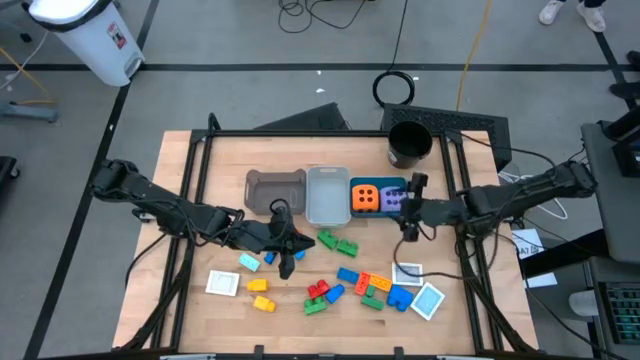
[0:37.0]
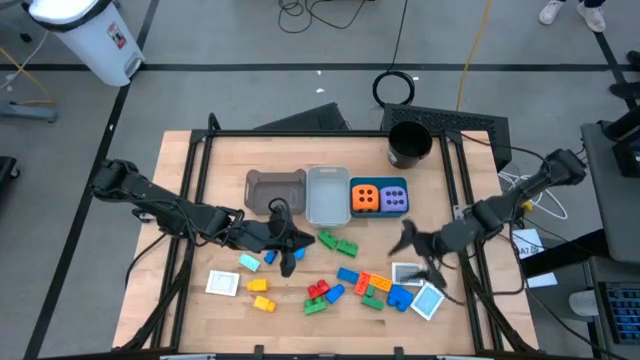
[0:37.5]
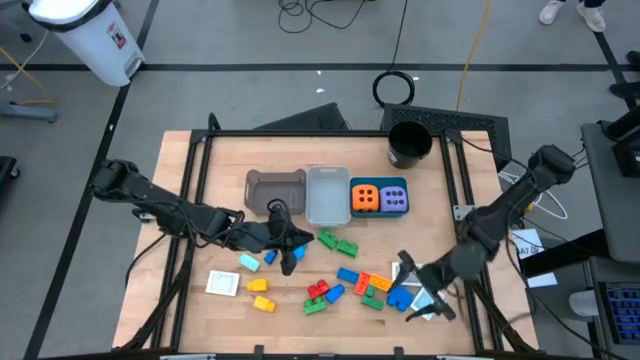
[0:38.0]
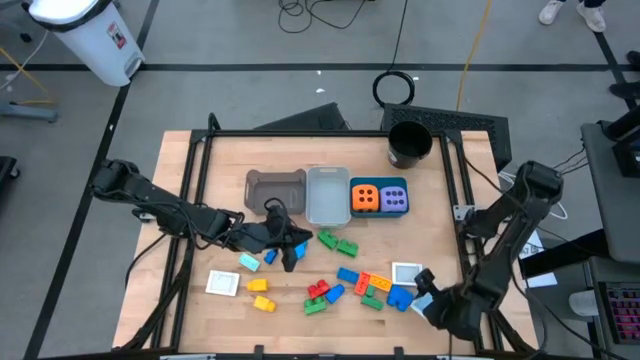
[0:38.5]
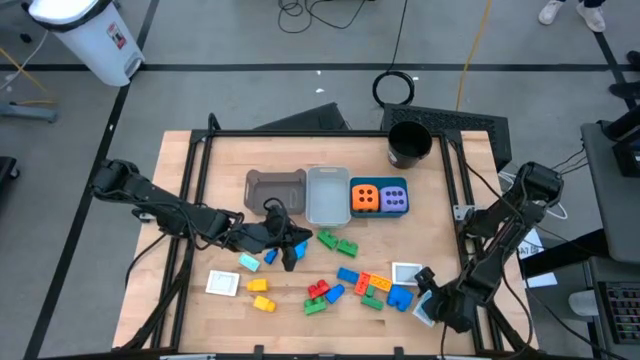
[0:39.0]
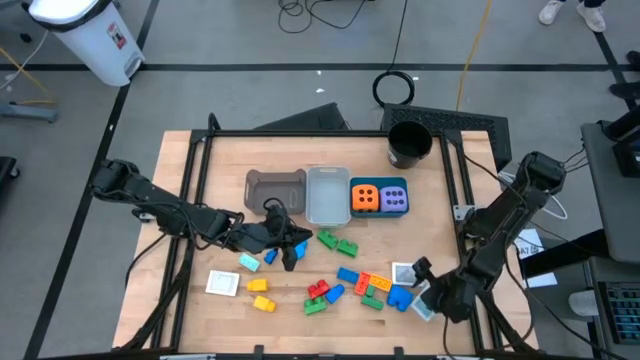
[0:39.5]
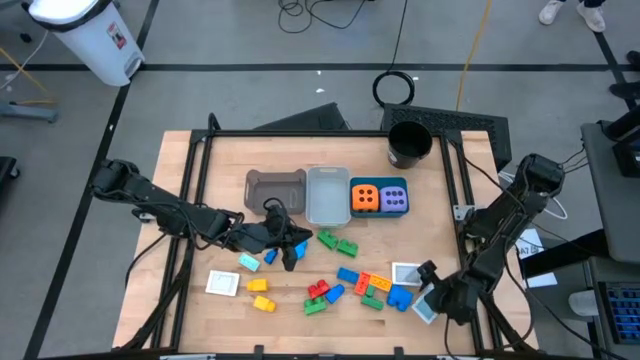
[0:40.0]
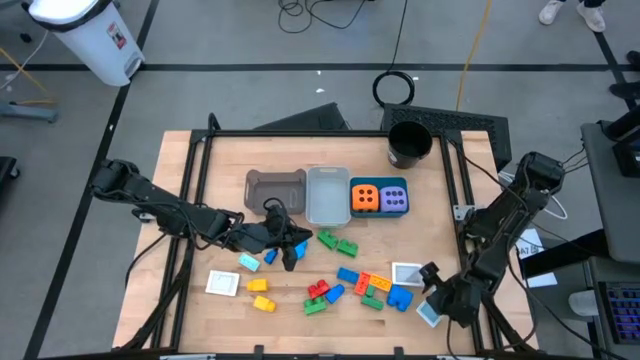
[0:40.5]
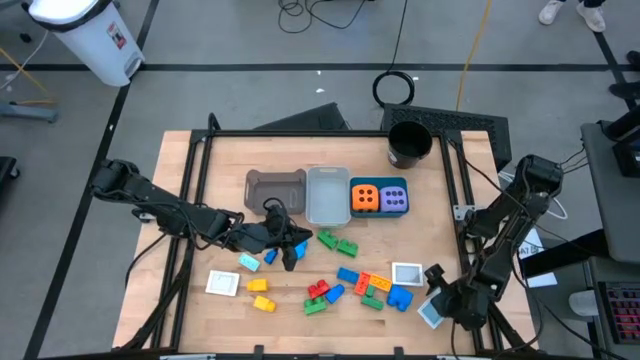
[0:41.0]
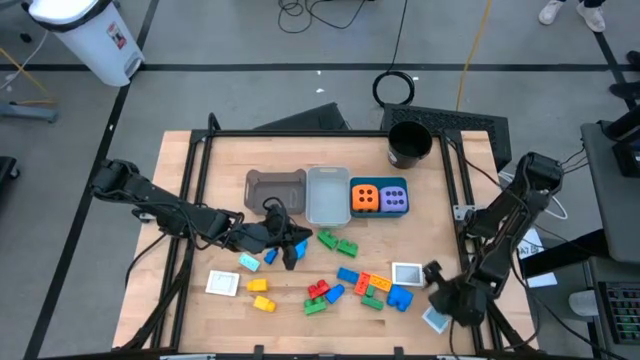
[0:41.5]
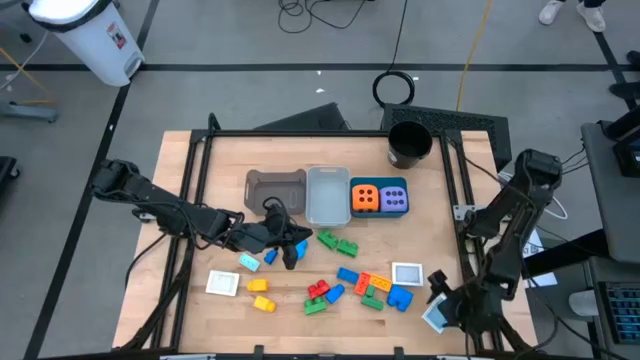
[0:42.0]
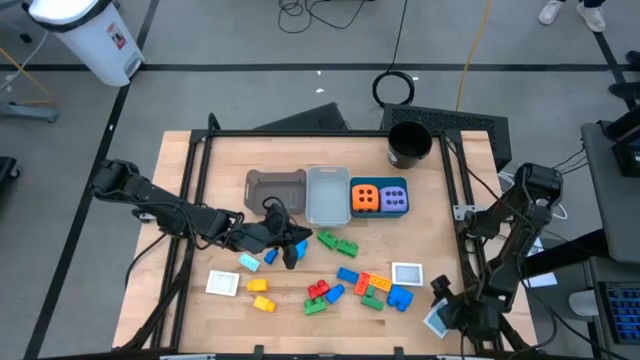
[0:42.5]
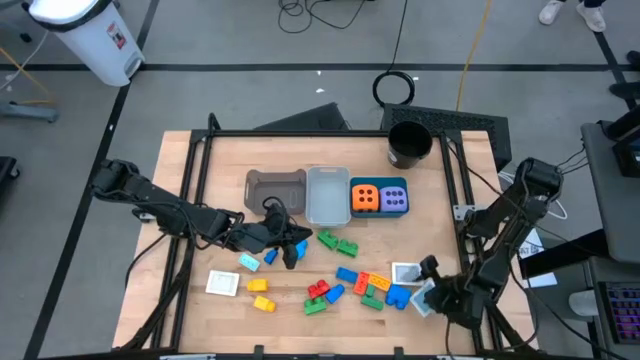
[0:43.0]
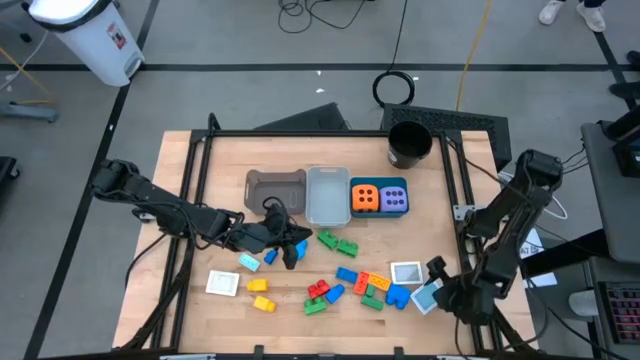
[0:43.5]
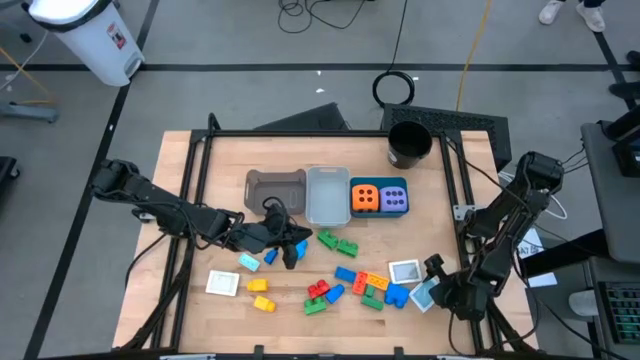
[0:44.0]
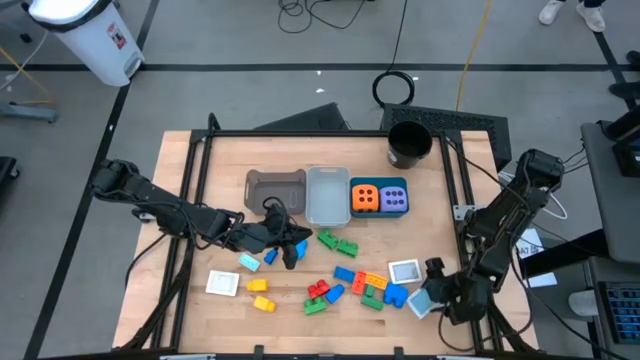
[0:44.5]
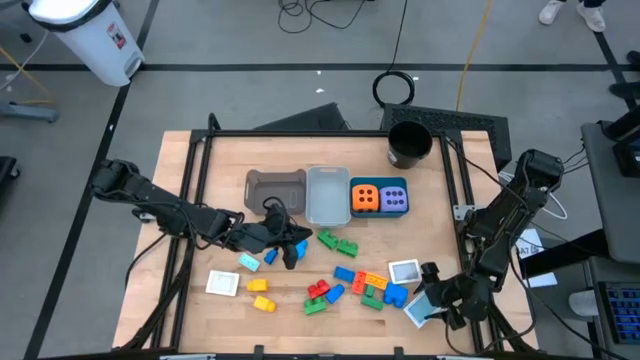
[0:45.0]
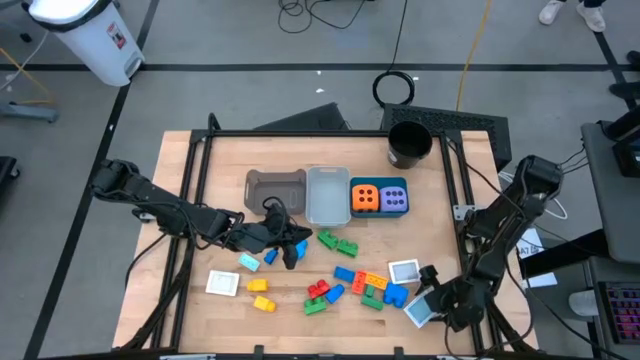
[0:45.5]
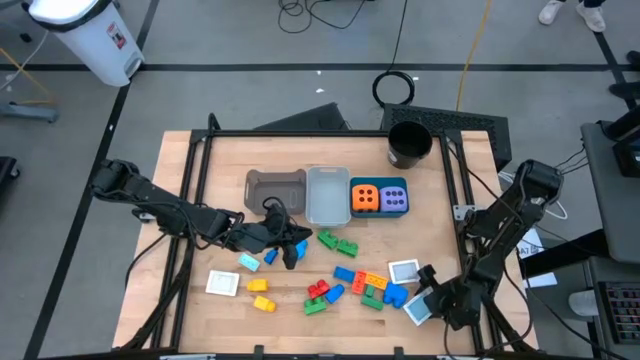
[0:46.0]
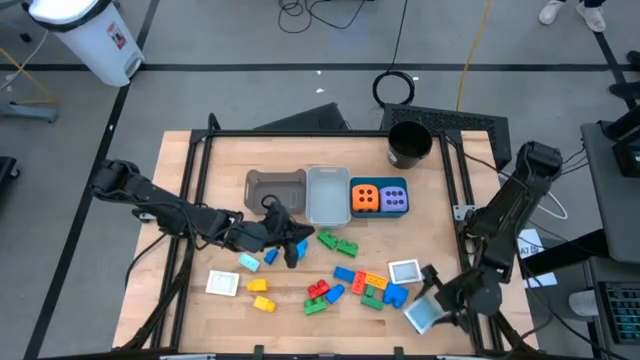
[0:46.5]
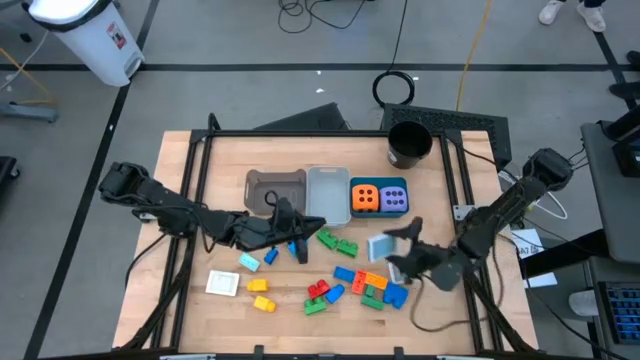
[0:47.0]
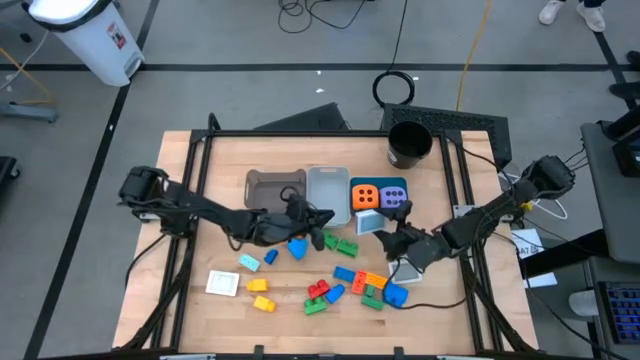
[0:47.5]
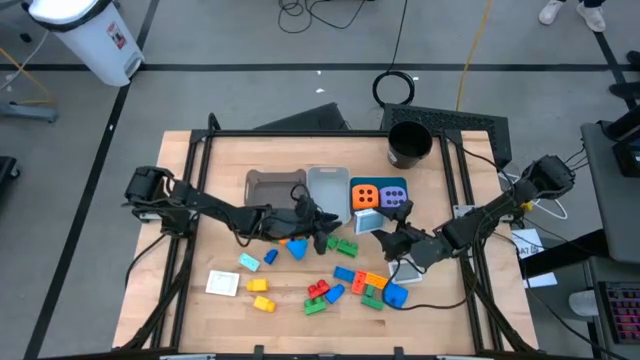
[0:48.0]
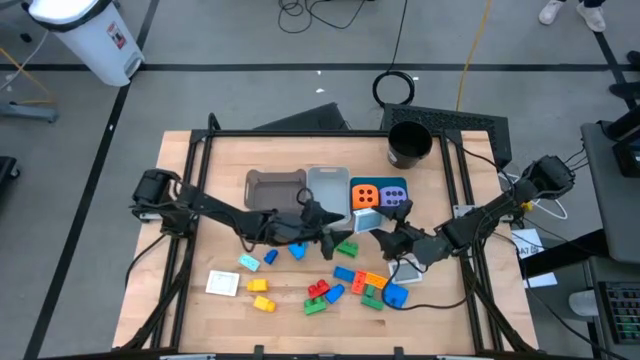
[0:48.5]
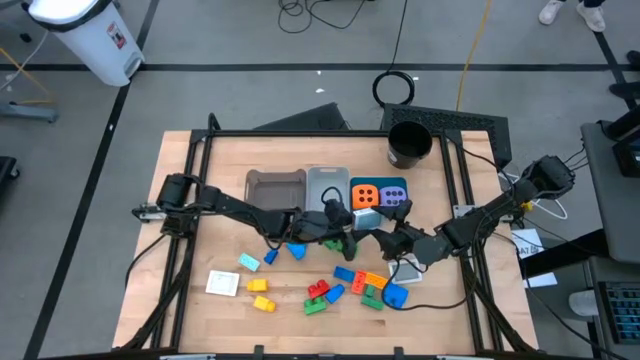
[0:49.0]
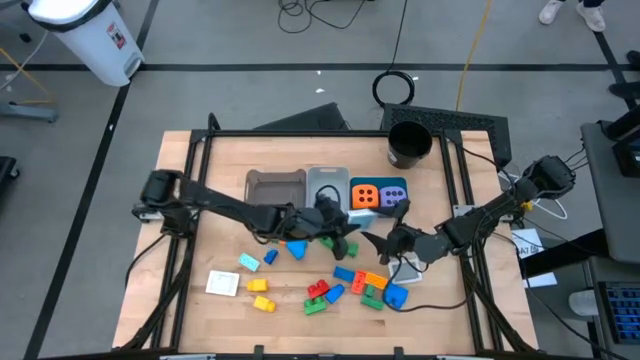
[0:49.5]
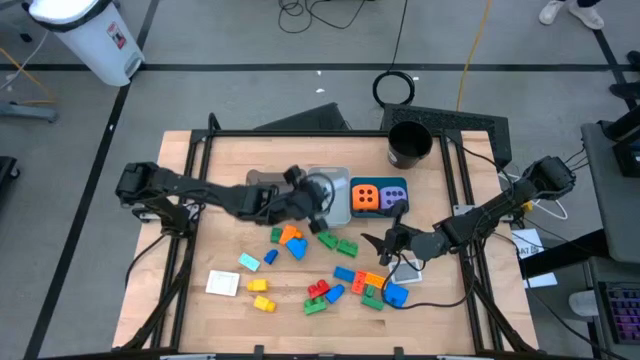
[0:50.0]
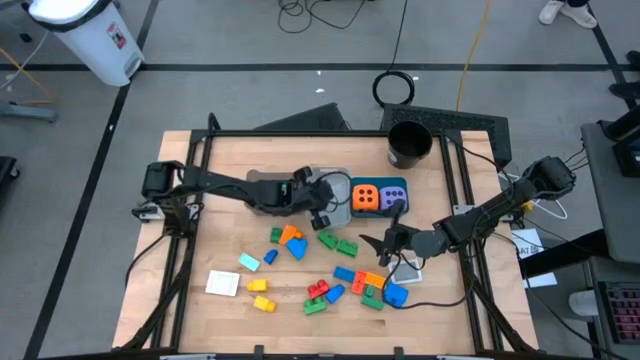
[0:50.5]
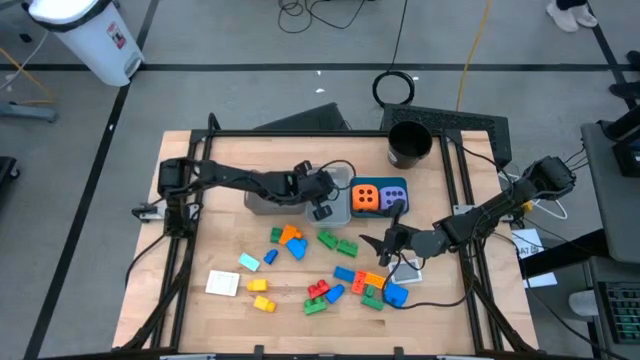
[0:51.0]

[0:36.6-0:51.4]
Task: Pick & Place Toys
Put the green playing card box into the gray bin

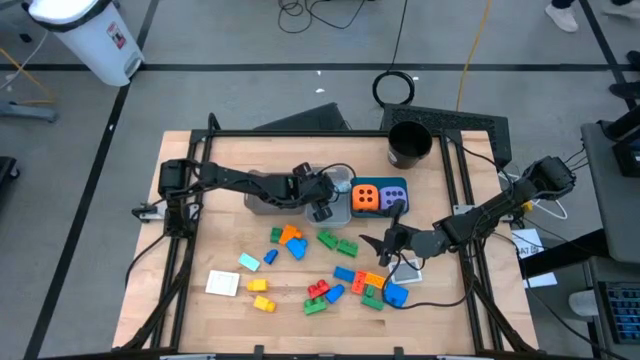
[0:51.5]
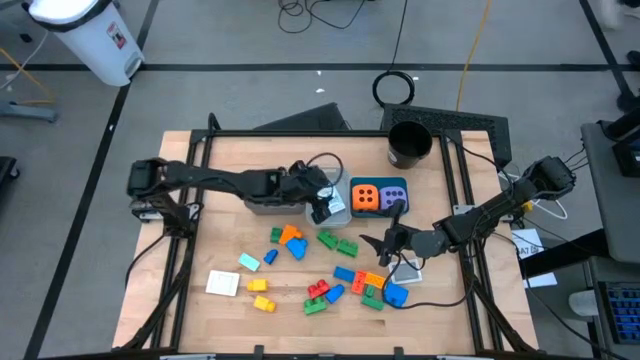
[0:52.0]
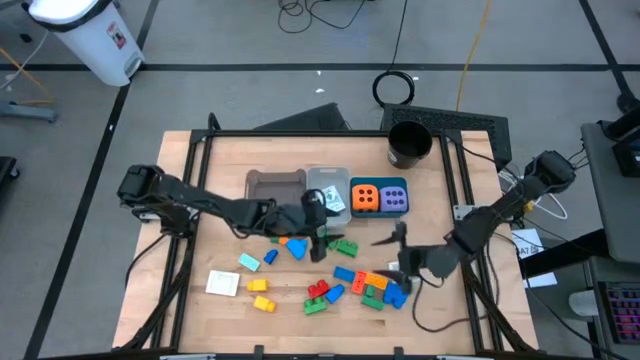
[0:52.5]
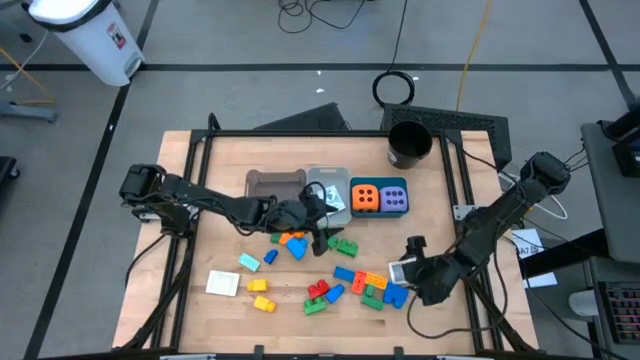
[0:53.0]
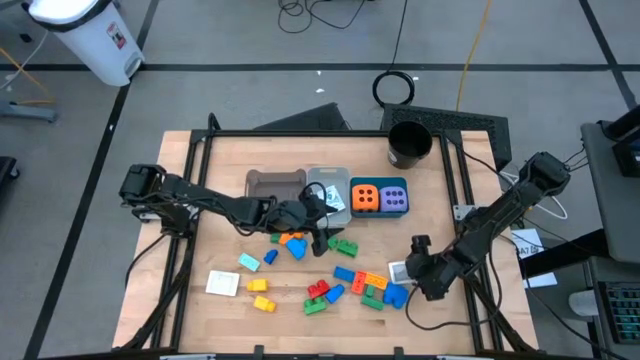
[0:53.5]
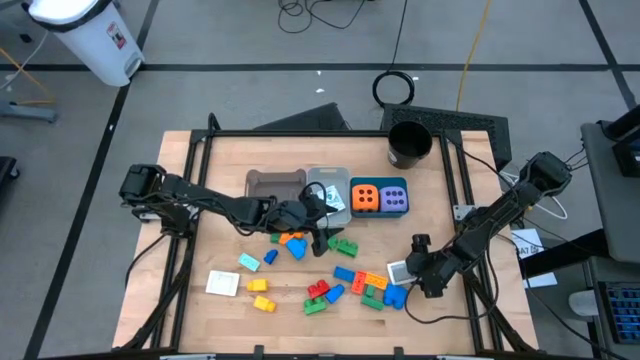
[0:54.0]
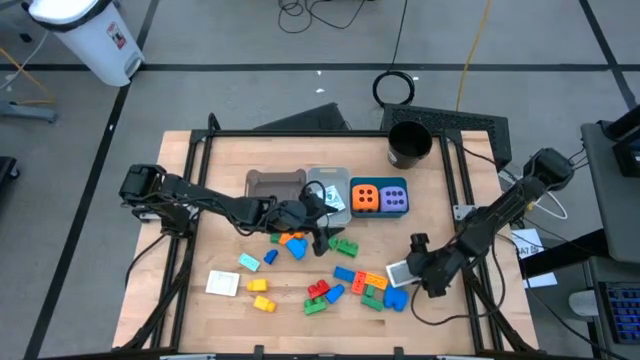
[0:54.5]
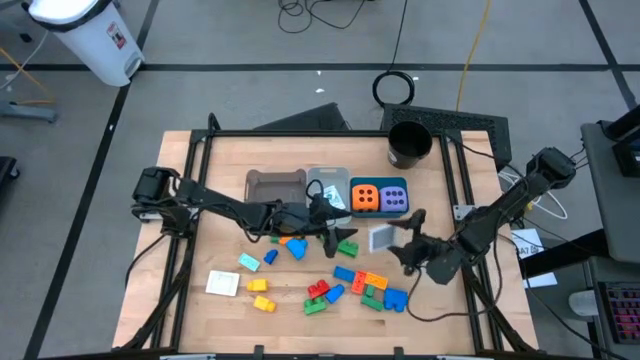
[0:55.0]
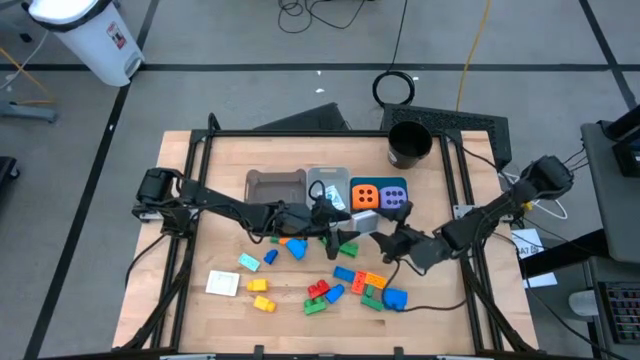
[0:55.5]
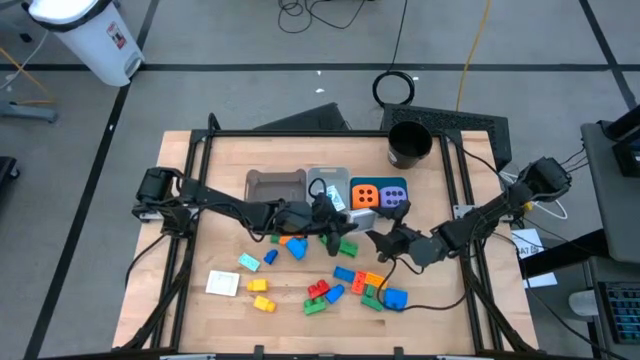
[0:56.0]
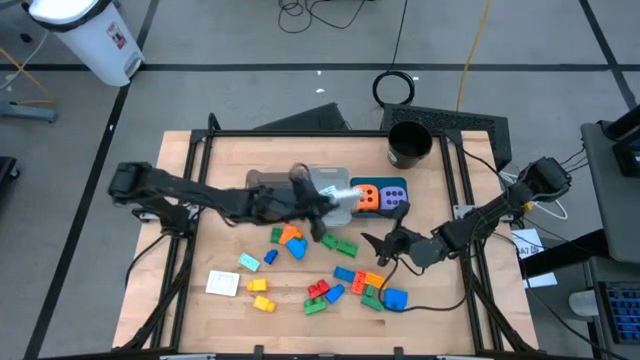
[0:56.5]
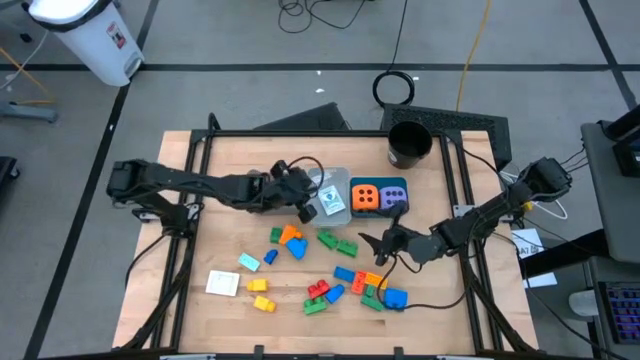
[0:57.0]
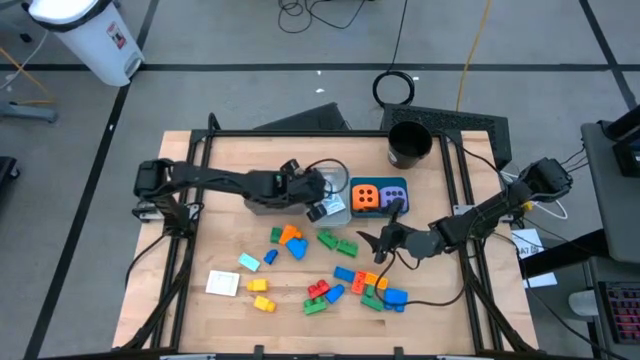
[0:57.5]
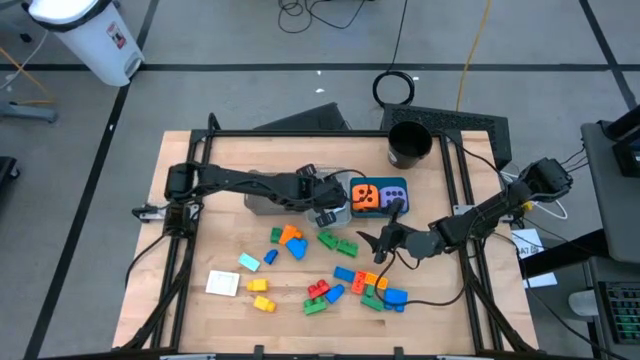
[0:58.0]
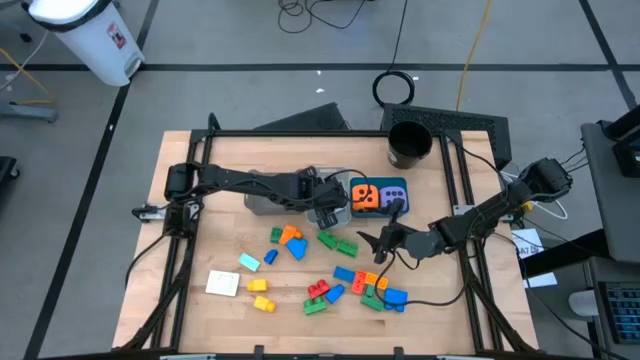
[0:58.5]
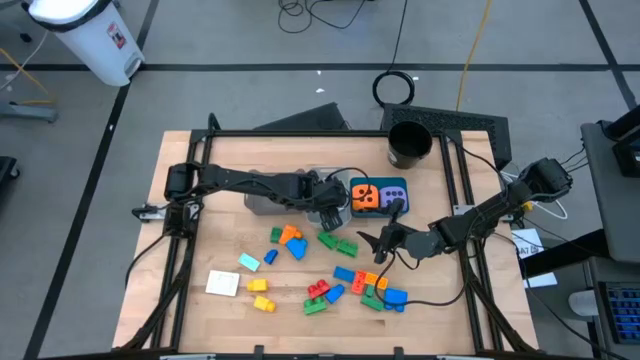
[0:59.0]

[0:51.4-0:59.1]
Put the black playing card box into the gray bin
